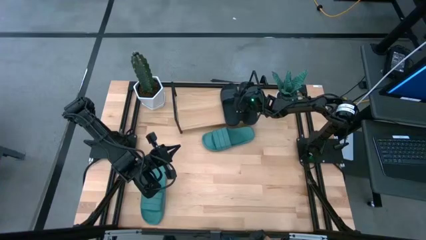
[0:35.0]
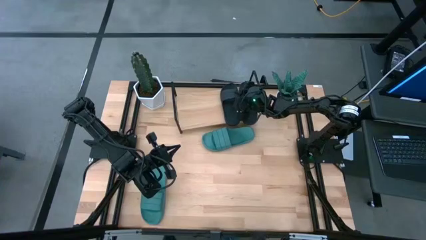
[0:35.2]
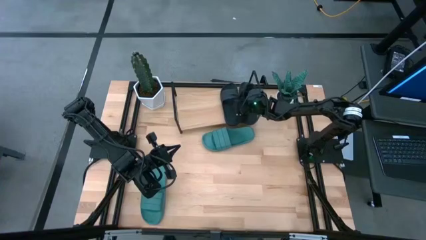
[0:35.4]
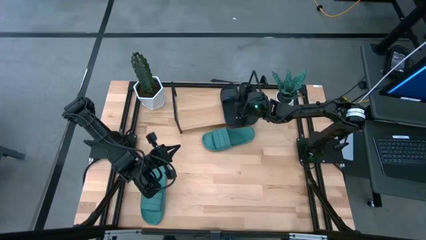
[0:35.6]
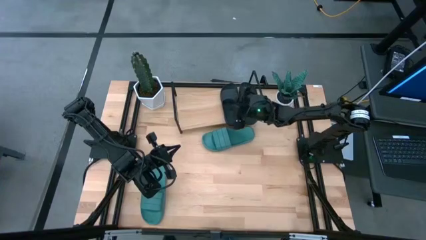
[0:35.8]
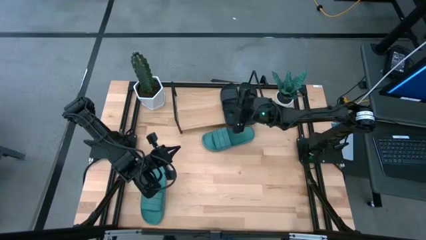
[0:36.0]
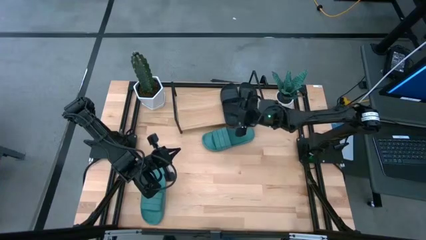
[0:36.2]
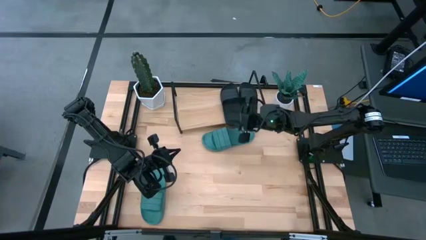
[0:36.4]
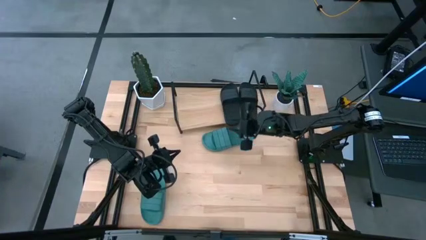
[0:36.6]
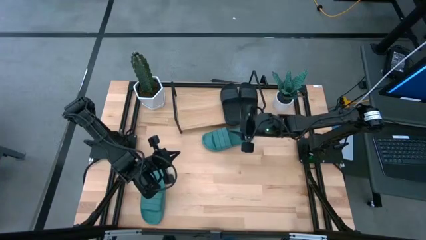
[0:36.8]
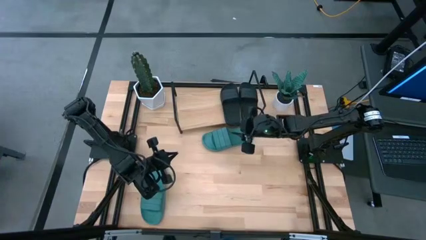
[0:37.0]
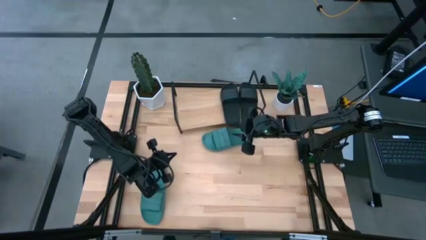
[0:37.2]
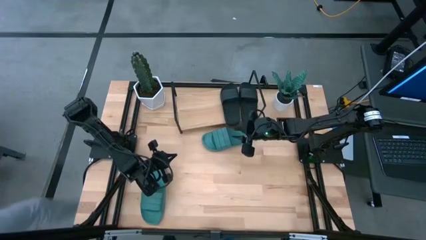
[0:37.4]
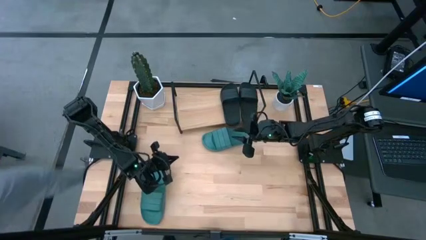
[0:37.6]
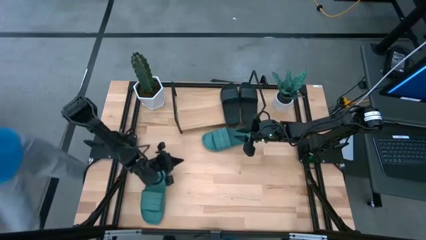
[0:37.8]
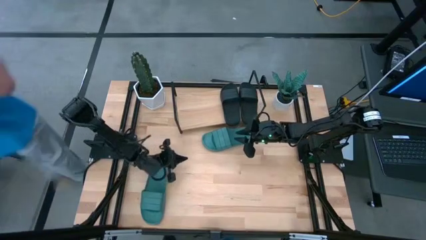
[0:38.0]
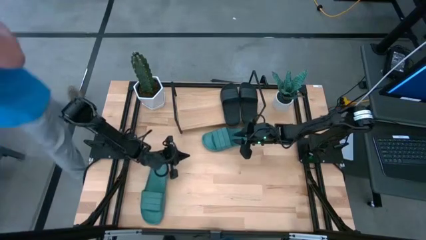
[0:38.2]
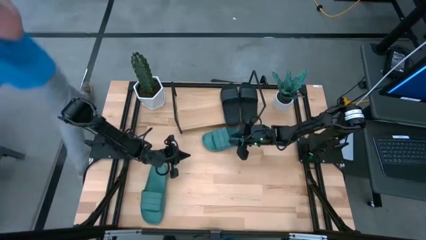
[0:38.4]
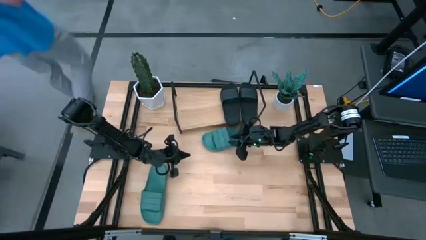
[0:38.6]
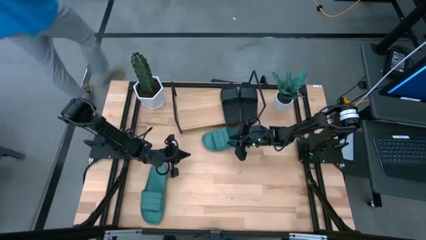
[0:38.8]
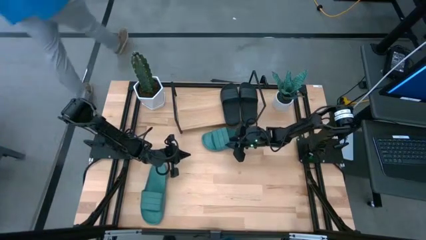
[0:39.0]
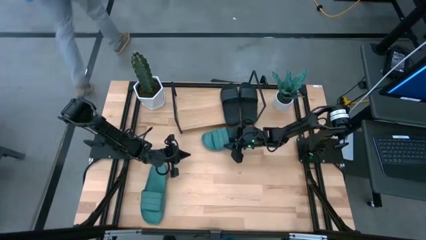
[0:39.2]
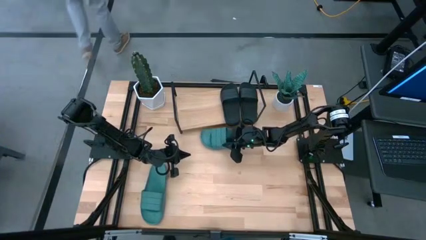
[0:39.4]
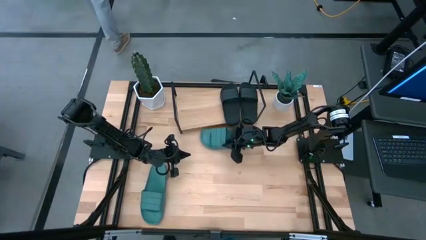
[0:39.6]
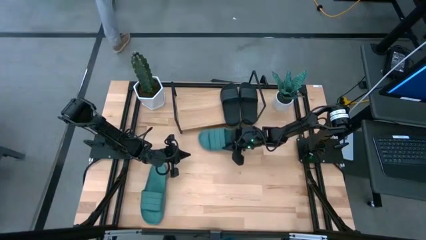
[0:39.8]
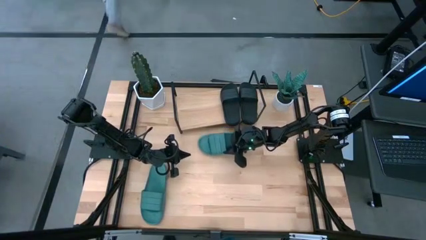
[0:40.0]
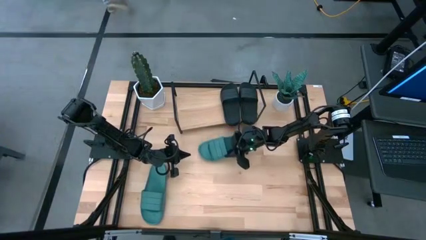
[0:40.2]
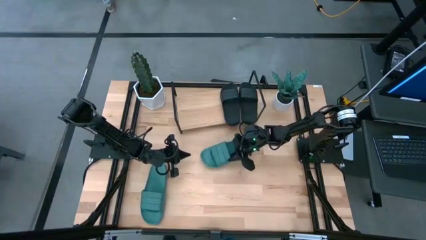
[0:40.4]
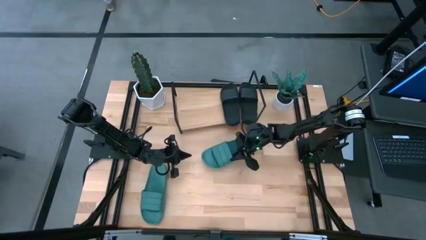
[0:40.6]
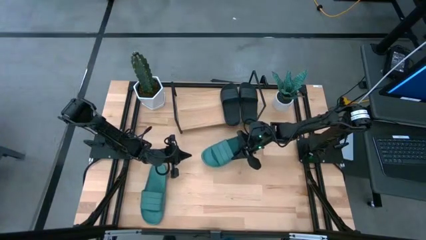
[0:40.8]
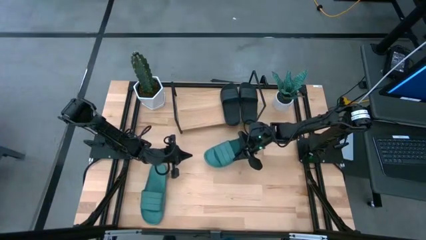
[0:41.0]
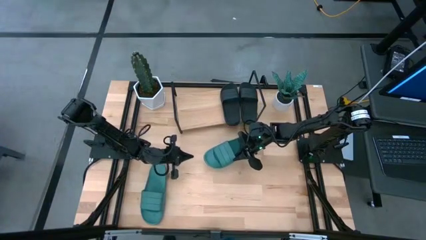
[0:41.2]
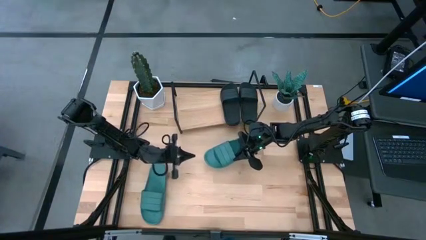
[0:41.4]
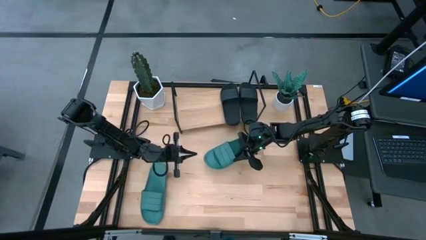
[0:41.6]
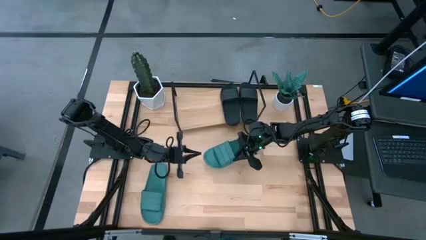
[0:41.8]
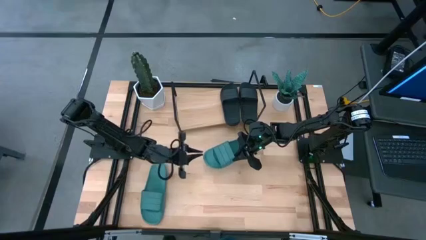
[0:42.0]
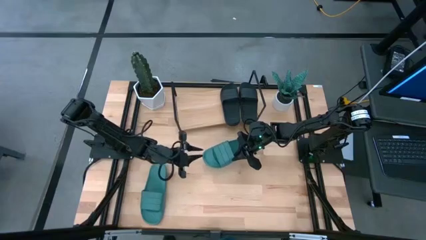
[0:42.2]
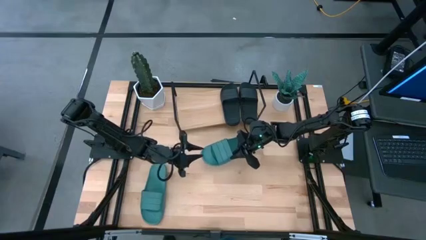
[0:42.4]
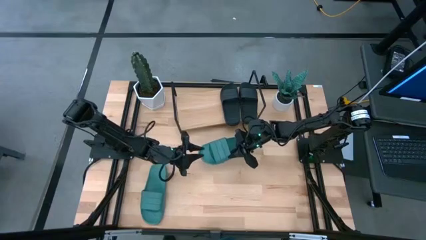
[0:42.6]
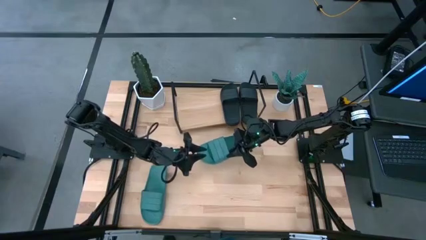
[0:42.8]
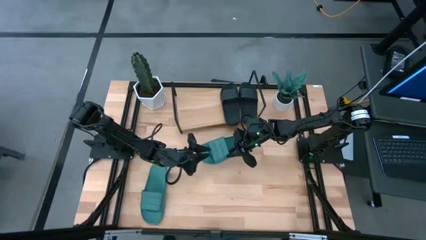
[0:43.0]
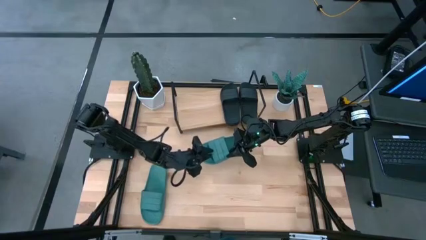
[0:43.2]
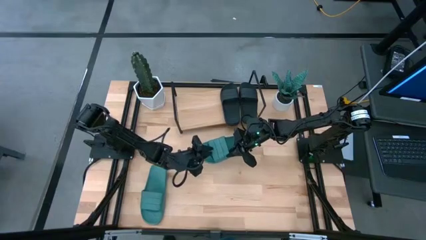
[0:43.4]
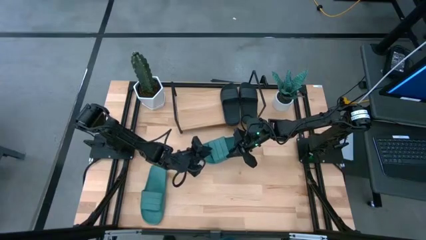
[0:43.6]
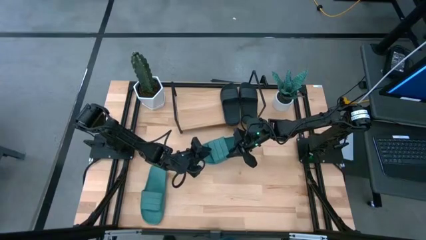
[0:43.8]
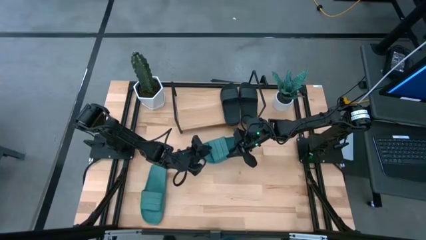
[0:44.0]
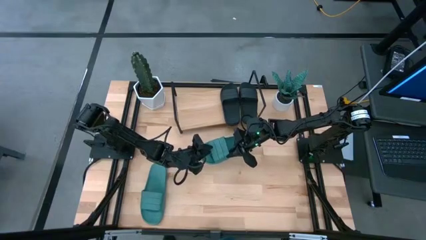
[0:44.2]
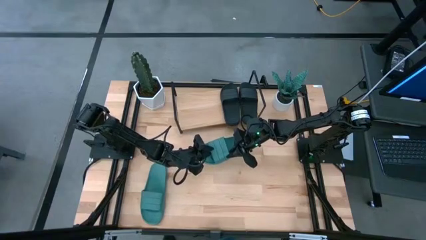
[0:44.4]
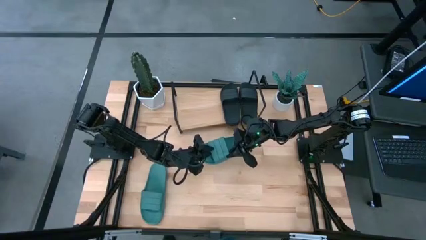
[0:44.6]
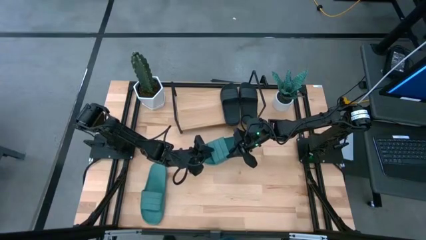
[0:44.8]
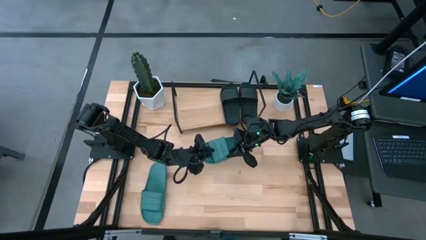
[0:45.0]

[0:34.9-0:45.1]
Task: Pick and place slides into the shelf
Put the top dark green slide on the shelf
